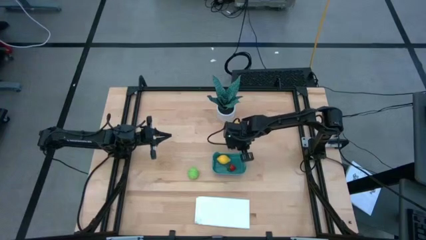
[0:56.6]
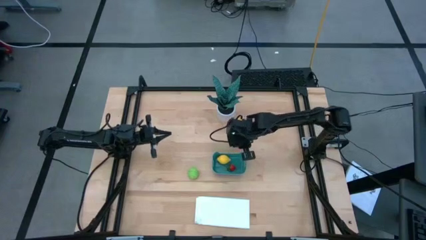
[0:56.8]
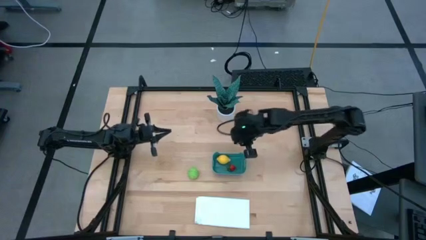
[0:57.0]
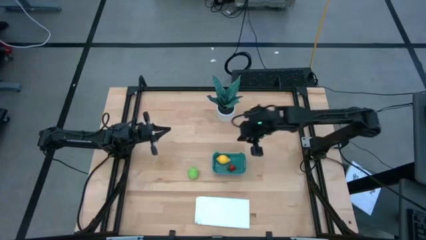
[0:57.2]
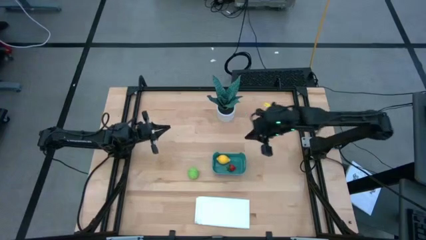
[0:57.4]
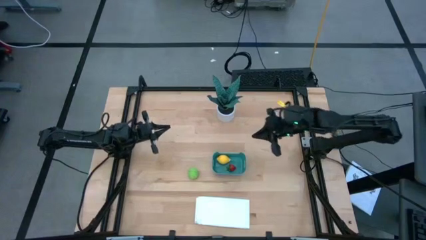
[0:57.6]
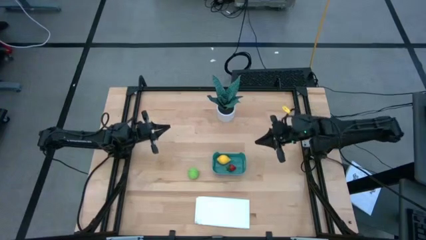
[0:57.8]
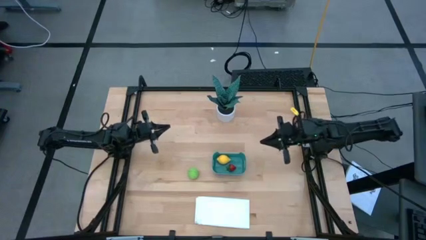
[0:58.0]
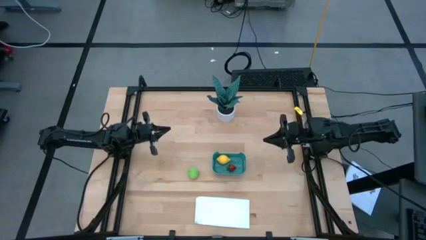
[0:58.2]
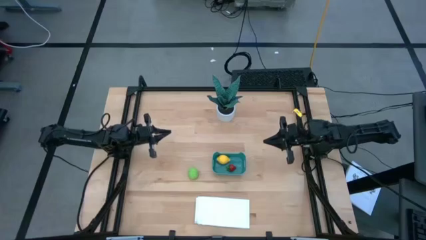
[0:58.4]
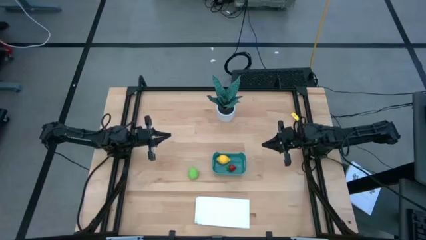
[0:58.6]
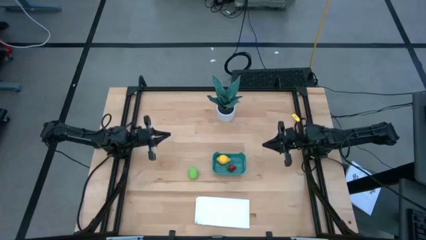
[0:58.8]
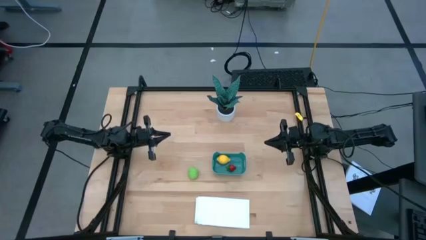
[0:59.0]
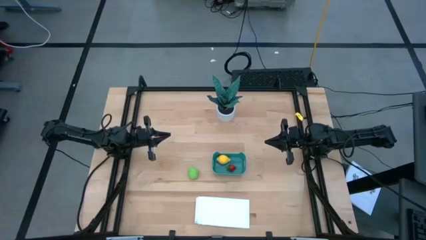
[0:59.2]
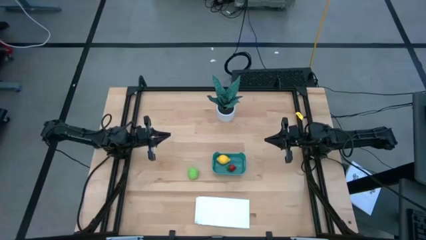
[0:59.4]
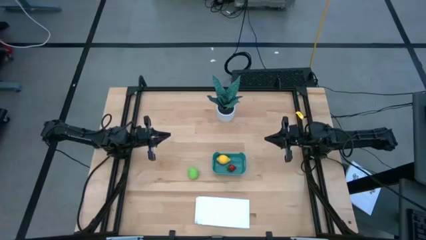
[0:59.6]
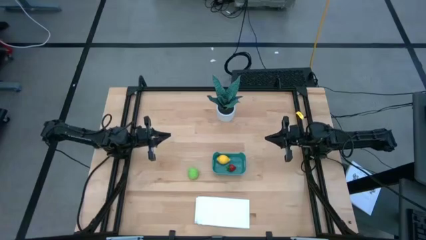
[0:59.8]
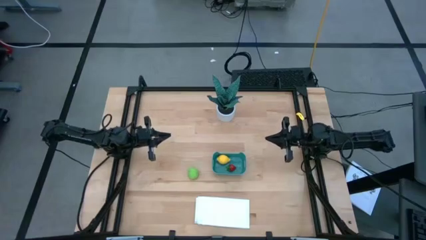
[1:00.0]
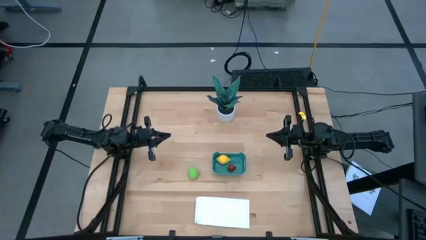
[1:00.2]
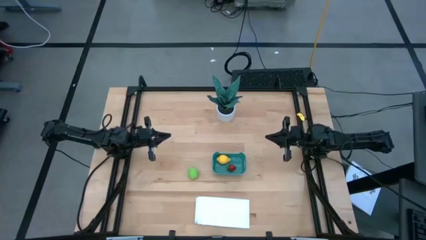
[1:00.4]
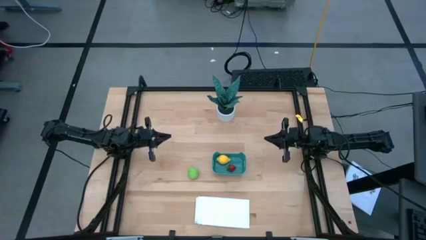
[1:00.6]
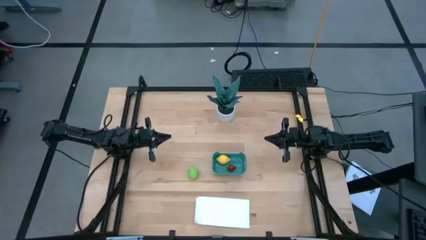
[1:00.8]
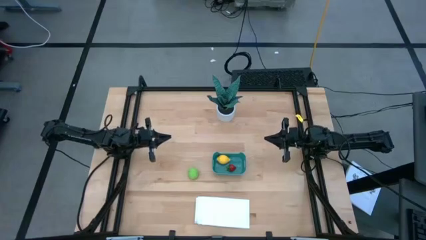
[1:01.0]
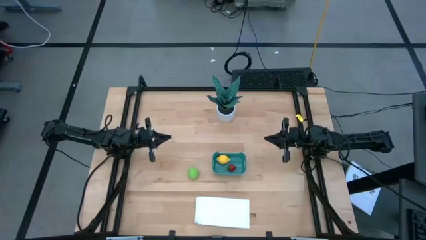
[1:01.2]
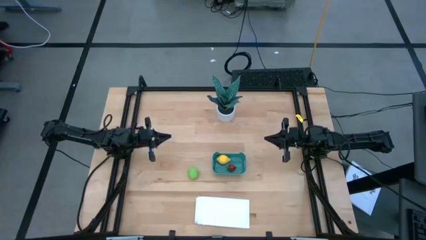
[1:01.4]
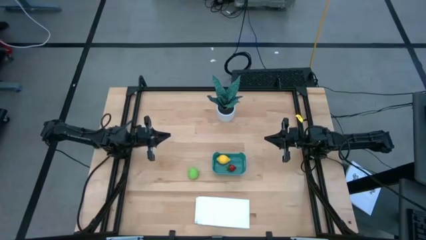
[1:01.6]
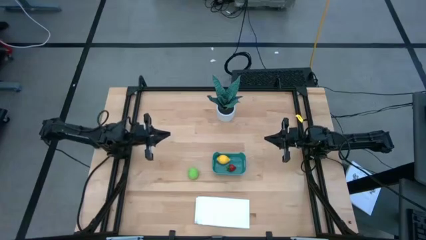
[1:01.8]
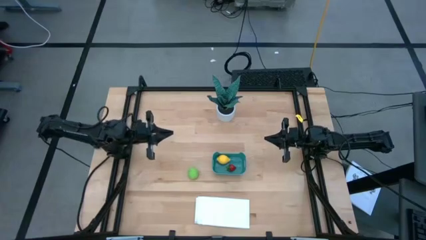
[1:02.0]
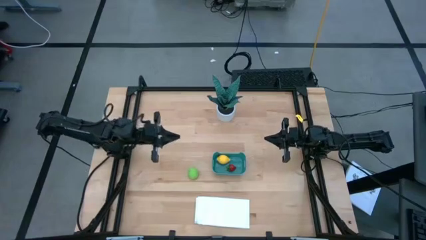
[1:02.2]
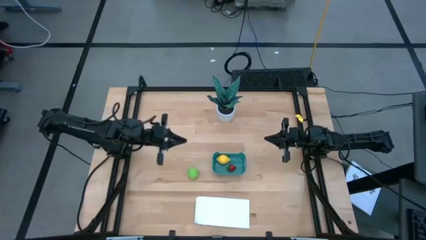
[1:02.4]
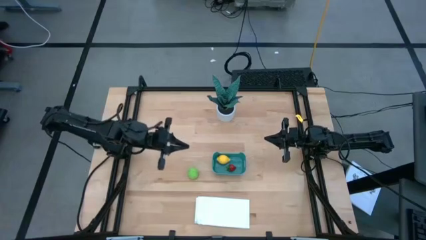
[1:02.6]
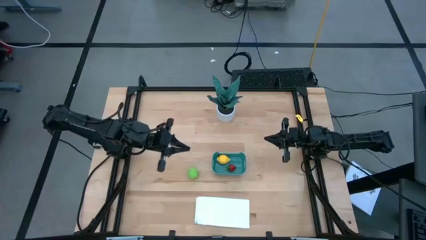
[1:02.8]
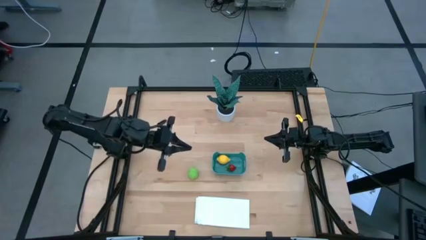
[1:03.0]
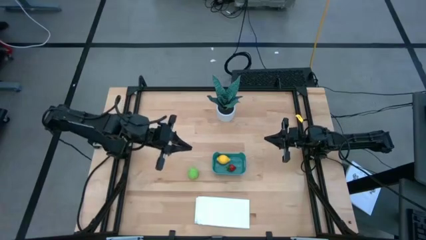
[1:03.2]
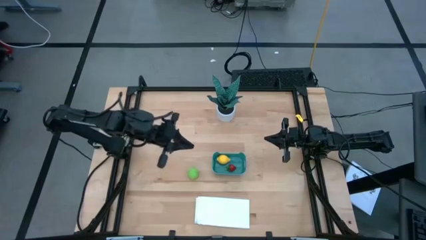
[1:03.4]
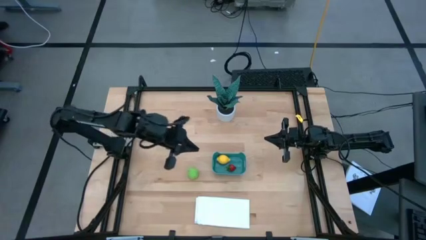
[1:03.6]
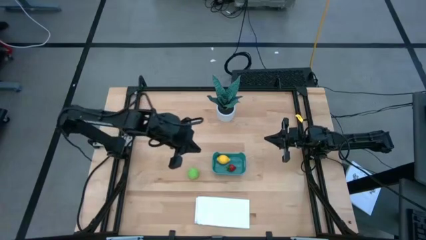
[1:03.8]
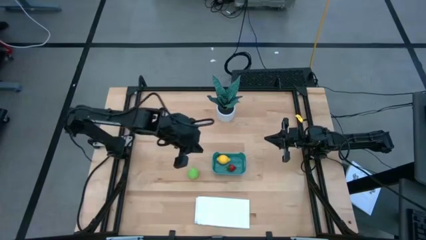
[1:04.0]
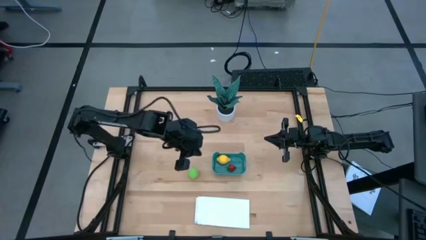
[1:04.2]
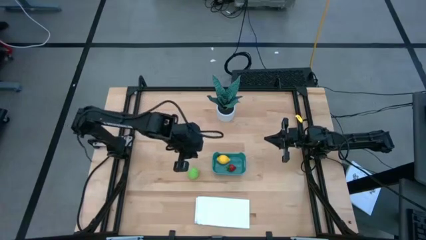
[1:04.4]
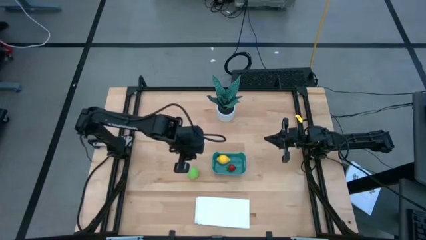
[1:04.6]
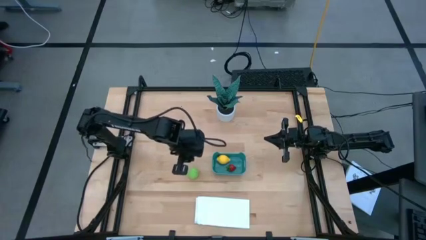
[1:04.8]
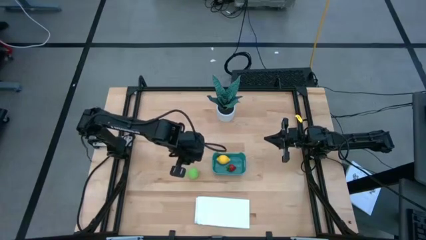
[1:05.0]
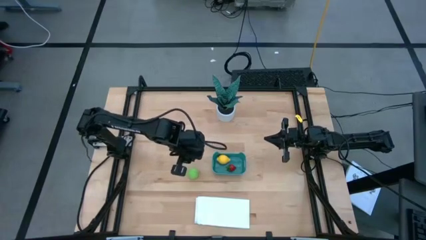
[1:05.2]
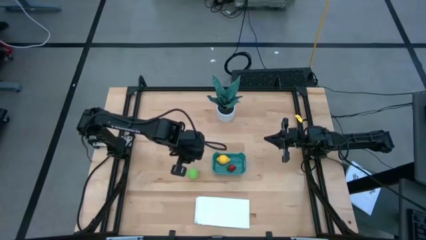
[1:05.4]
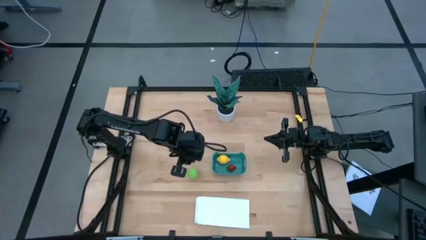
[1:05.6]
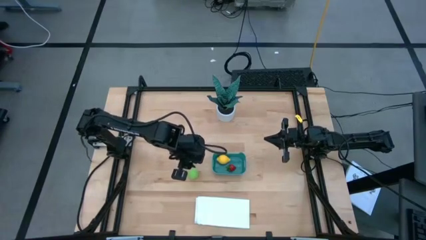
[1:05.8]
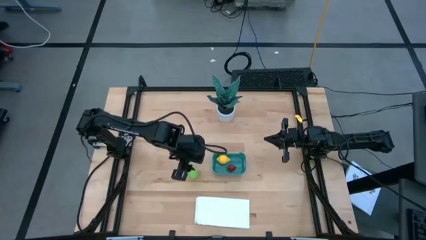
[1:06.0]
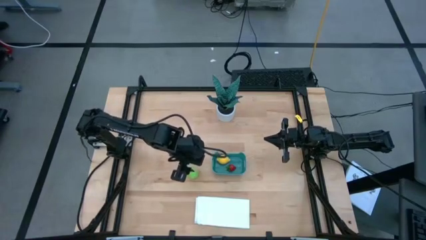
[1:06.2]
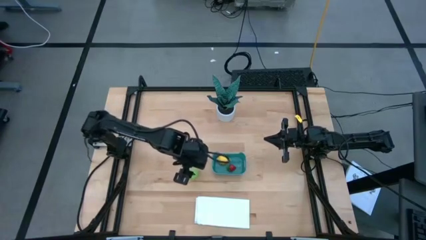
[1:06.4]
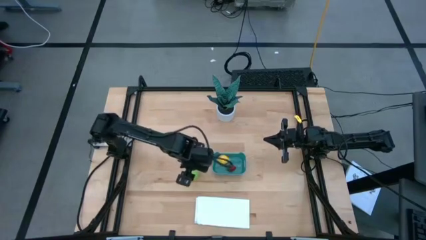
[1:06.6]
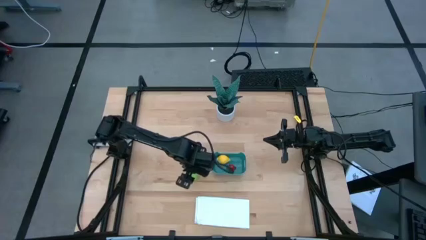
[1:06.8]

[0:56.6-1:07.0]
Task: Pick and placing Produce into tupperware
Put the green cabbage into the green bin

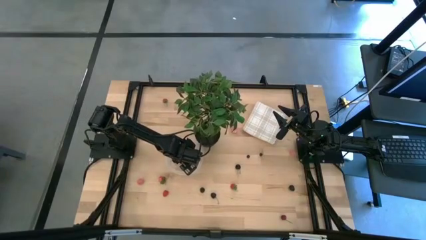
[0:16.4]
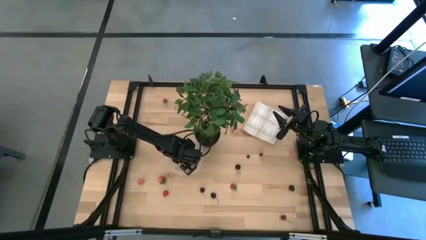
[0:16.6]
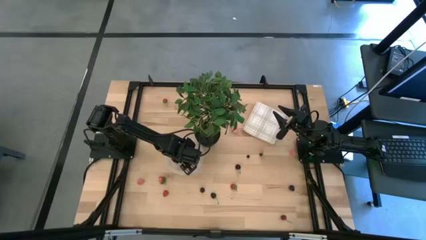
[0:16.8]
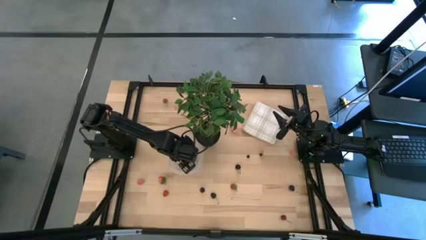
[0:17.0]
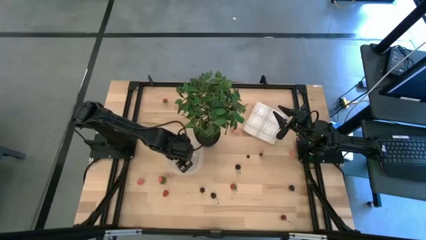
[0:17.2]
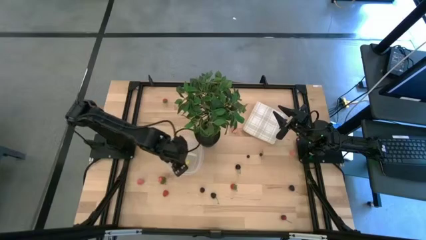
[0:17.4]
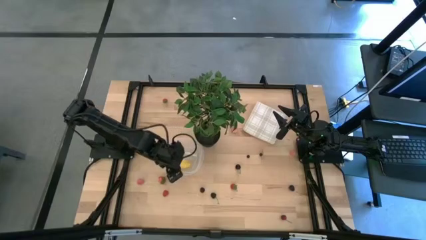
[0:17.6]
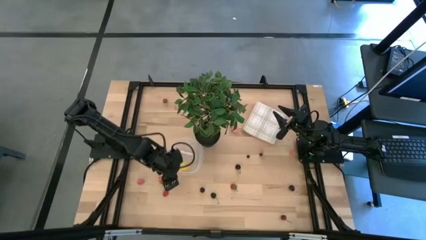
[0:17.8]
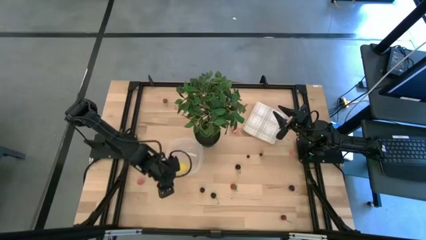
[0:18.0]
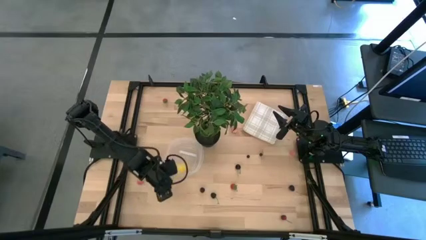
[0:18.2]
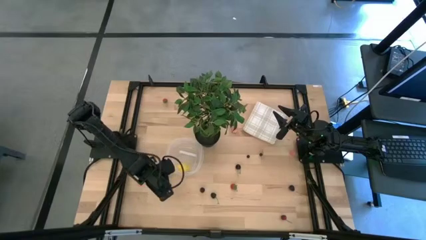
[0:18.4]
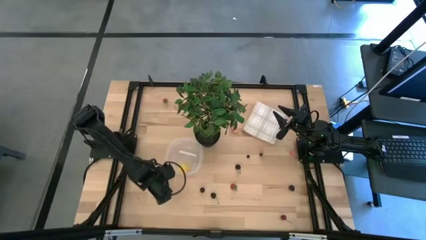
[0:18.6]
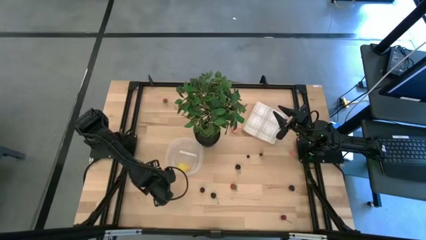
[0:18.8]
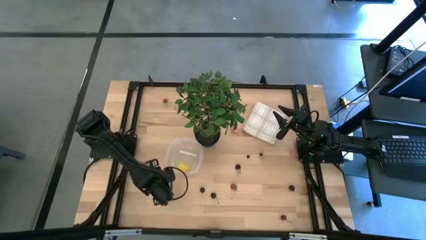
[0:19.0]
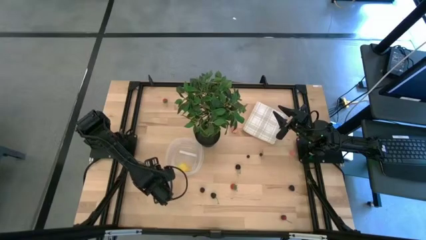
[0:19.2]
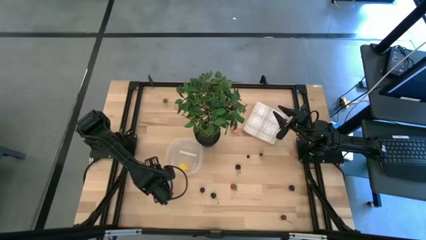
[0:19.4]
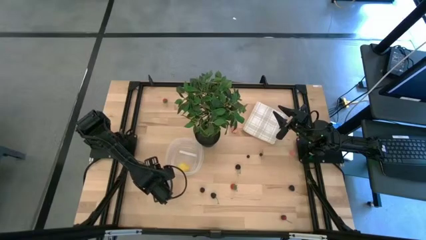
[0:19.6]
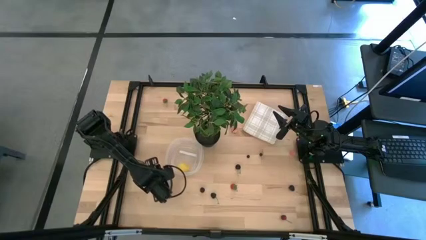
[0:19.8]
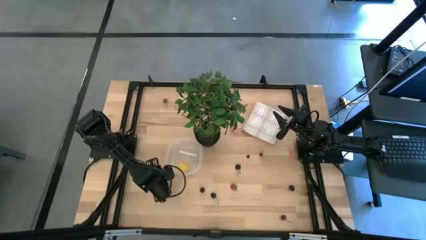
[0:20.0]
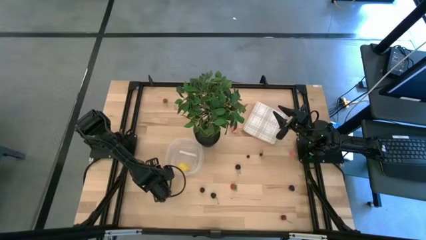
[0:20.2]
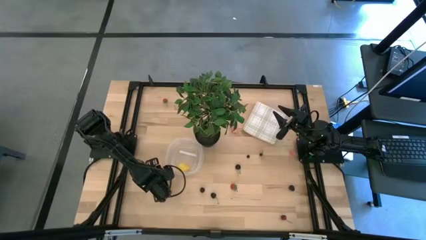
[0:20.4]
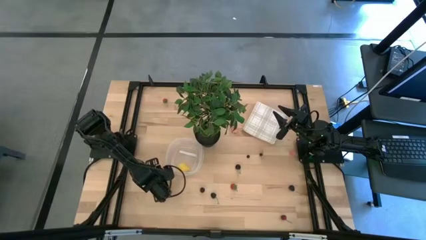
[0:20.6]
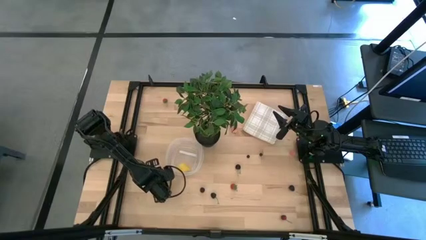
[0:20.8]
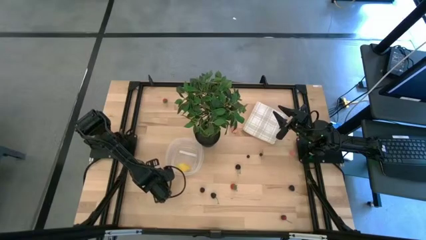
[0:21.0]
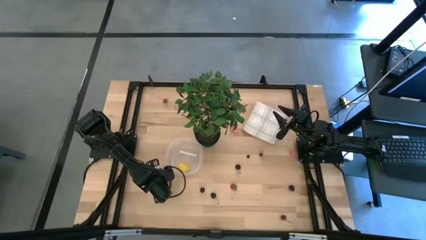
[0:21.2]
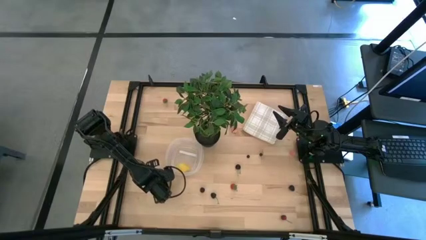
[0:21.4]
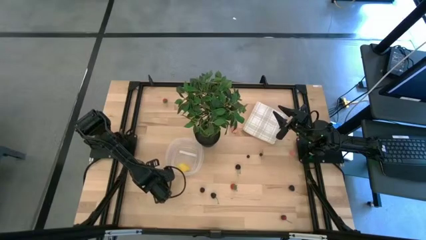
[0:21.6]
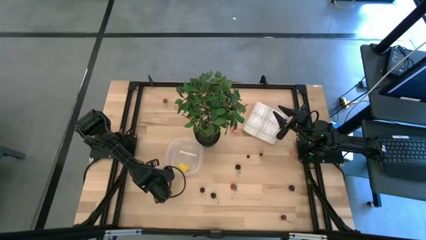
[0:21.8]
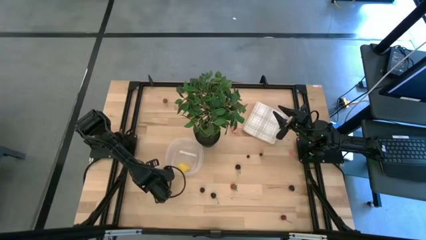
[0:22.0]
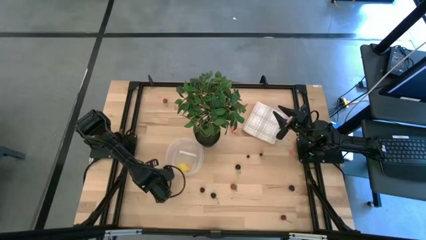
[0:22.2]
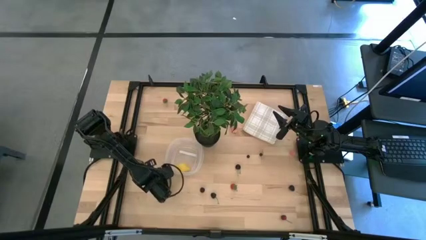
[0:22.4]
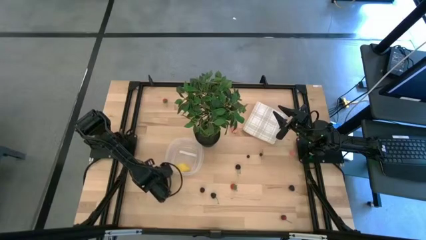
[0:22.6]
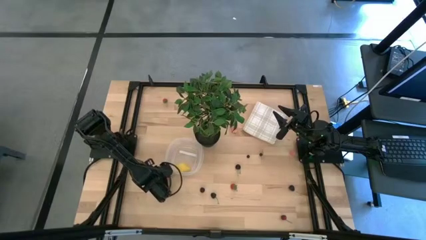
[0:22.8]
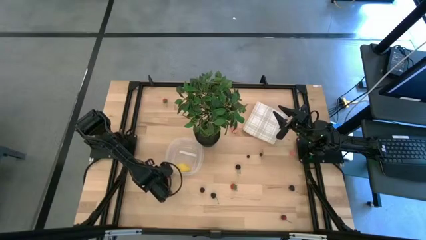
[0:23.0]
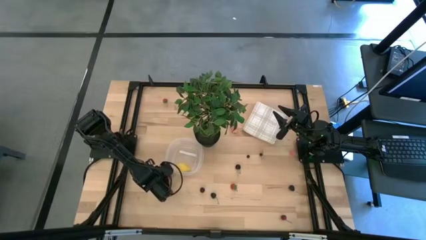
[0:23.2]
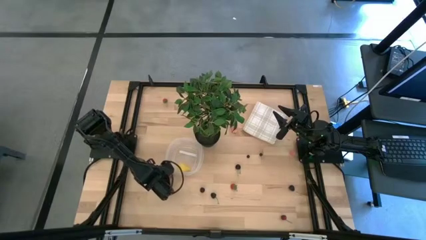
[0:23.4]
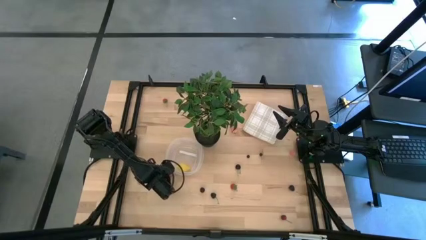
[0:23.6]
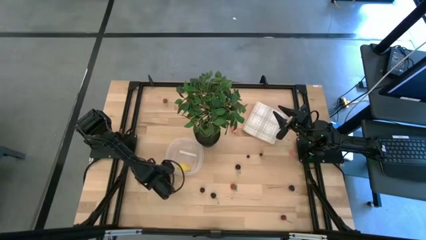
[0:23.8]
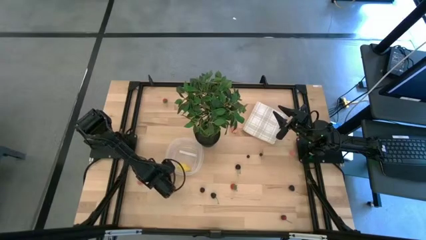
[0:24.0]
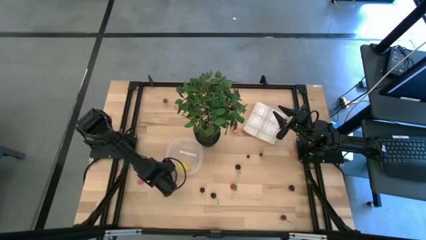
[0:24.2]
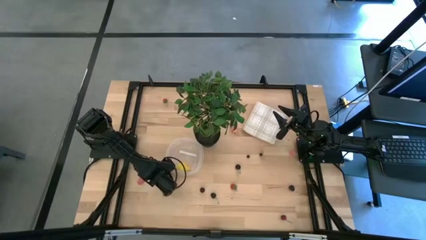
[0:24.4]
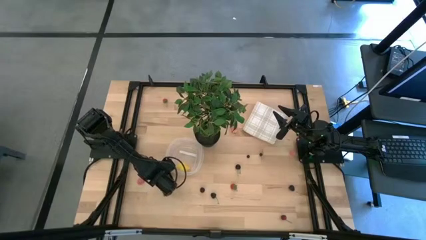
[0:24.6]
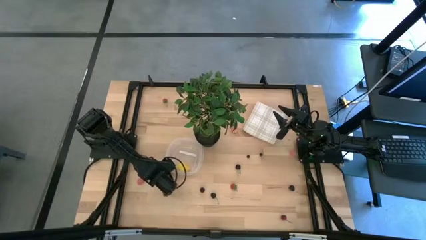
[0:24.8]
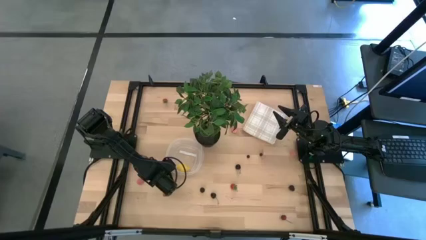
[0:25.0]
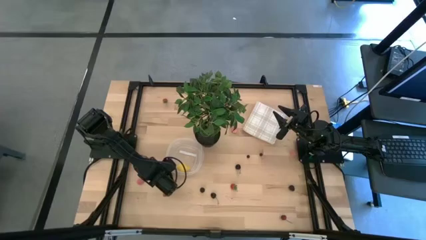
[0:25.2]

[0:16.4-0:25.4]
Task: Pick and placing Produce into tupperware
Put the middle left red strawberry into the transparent bin
